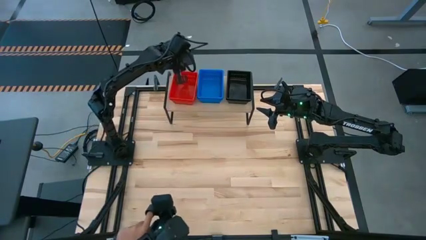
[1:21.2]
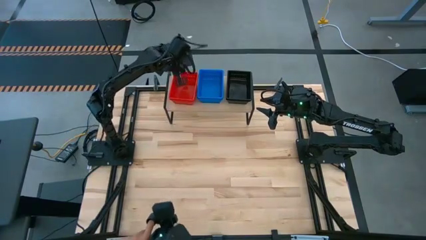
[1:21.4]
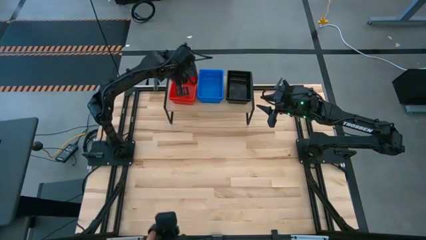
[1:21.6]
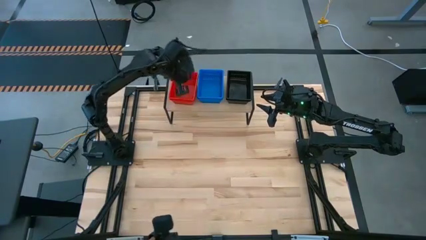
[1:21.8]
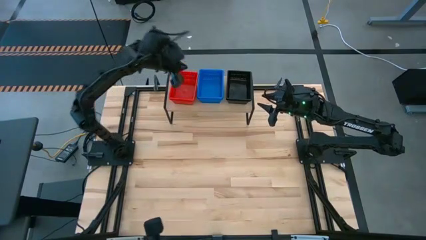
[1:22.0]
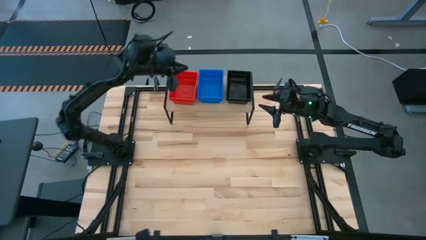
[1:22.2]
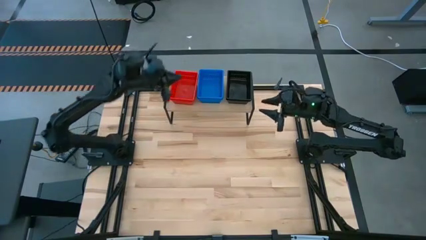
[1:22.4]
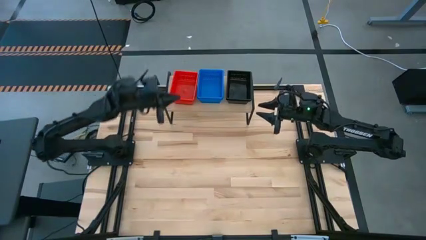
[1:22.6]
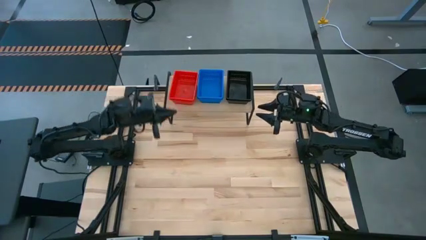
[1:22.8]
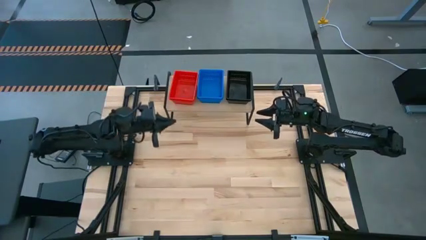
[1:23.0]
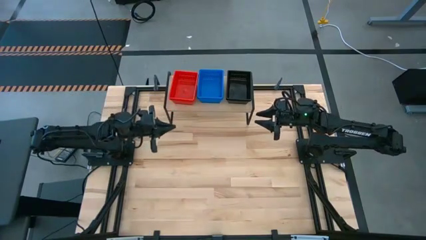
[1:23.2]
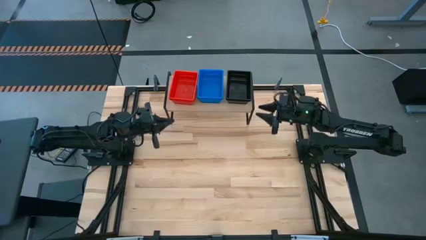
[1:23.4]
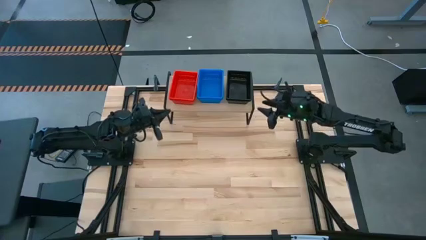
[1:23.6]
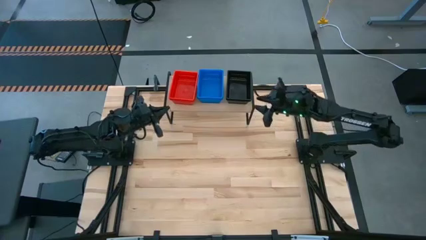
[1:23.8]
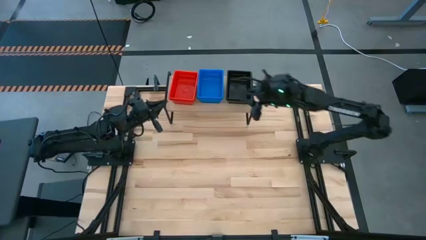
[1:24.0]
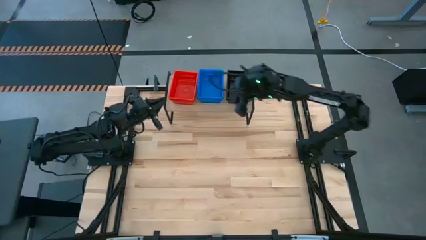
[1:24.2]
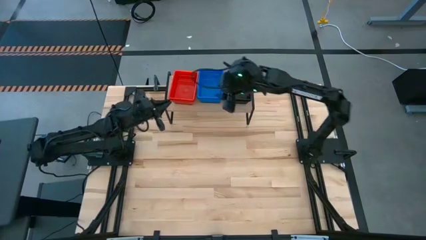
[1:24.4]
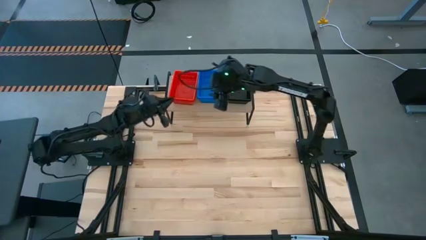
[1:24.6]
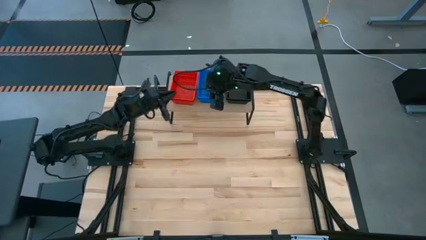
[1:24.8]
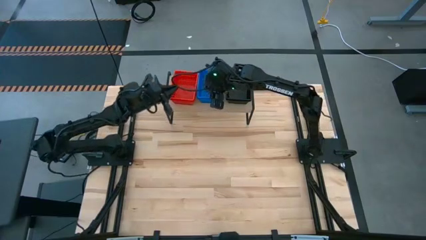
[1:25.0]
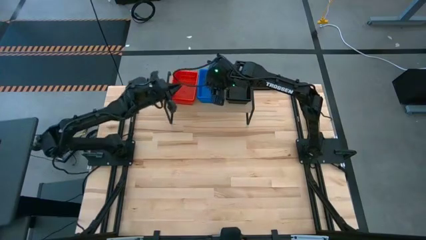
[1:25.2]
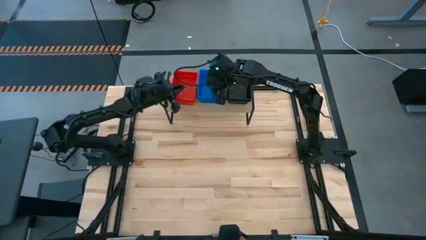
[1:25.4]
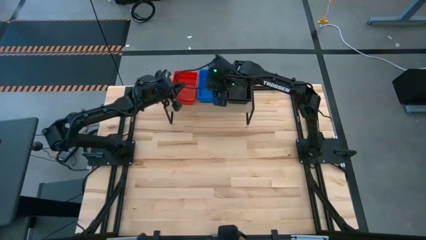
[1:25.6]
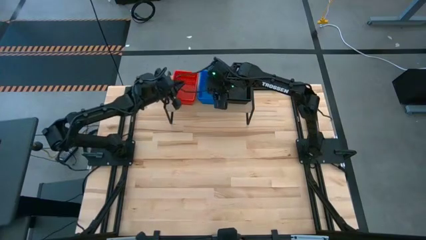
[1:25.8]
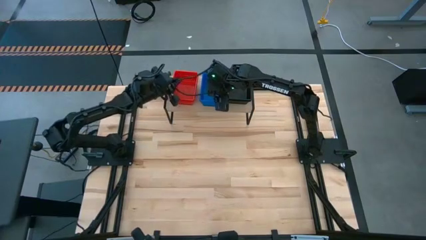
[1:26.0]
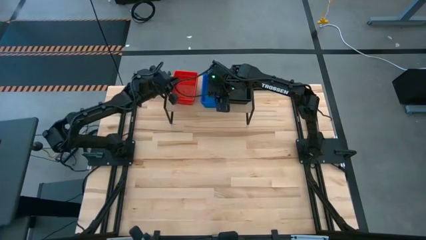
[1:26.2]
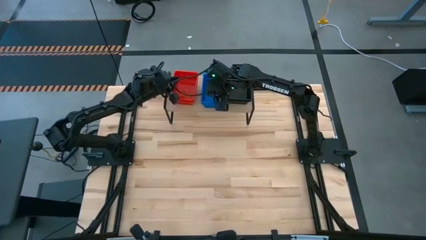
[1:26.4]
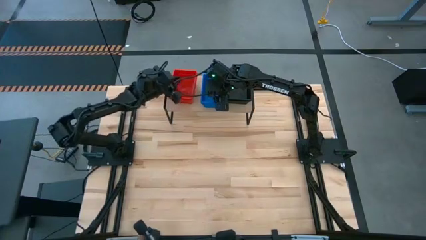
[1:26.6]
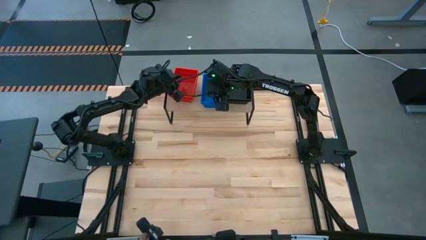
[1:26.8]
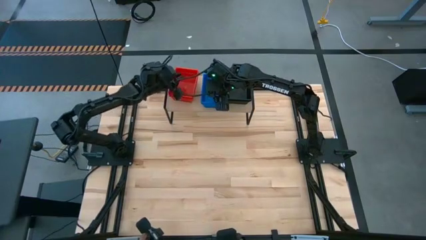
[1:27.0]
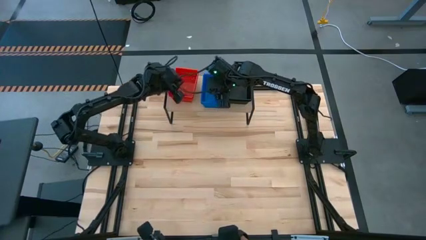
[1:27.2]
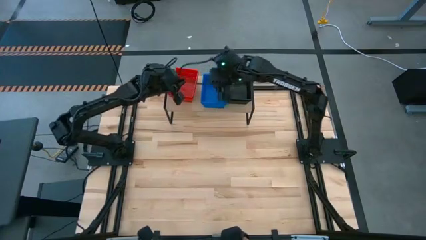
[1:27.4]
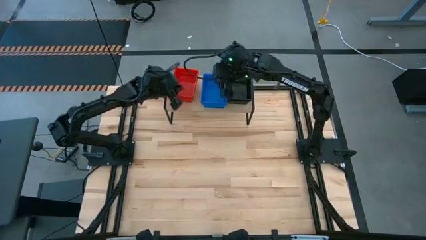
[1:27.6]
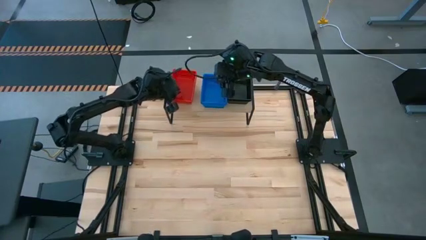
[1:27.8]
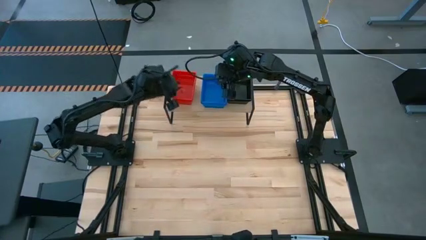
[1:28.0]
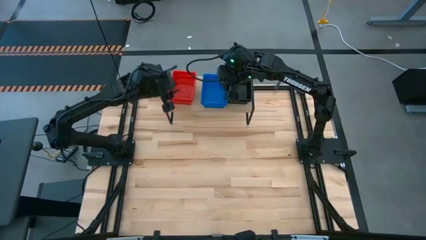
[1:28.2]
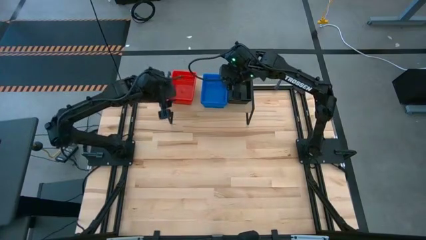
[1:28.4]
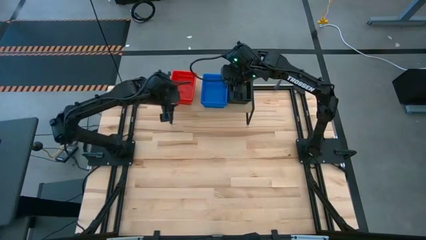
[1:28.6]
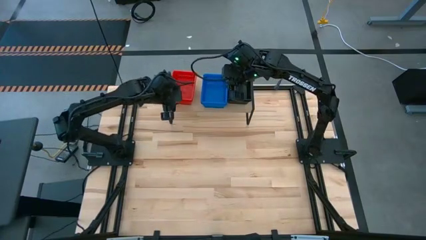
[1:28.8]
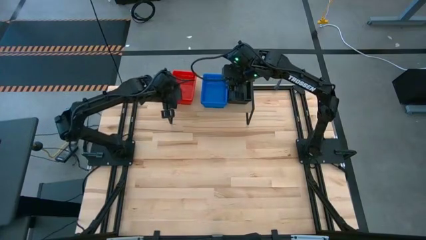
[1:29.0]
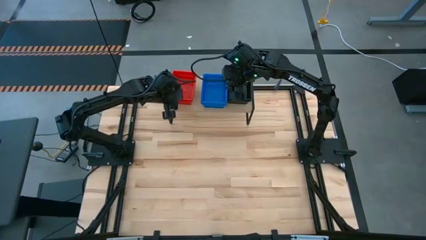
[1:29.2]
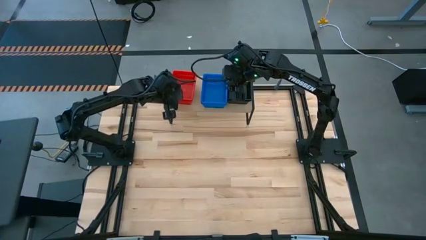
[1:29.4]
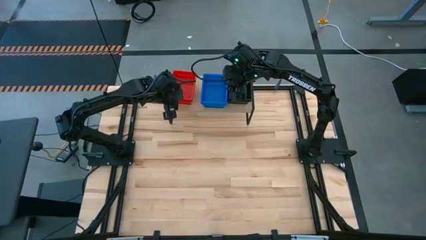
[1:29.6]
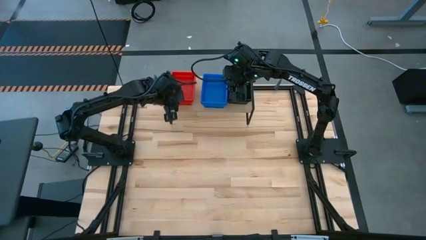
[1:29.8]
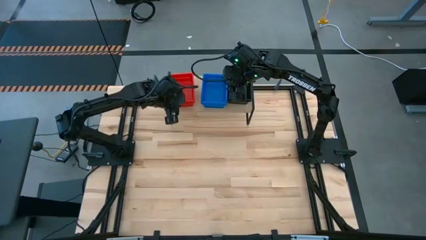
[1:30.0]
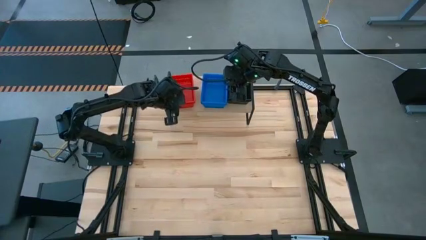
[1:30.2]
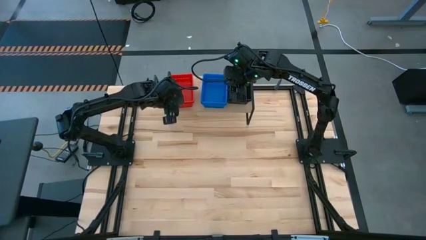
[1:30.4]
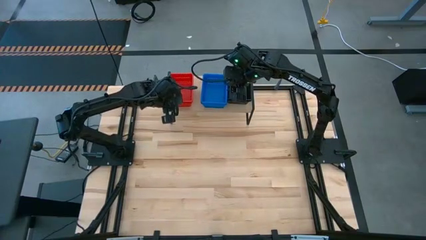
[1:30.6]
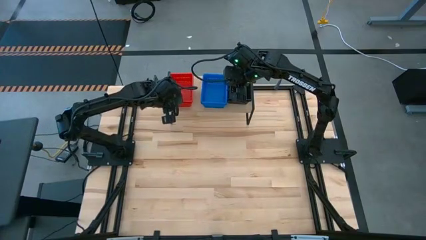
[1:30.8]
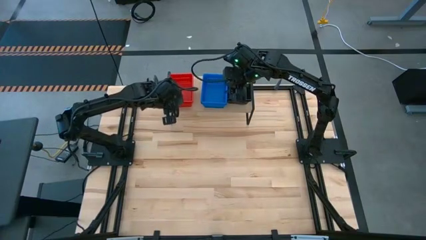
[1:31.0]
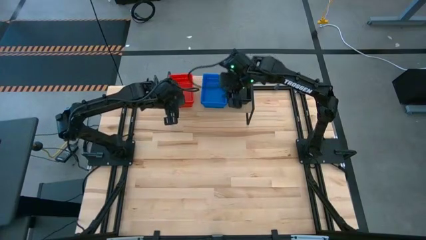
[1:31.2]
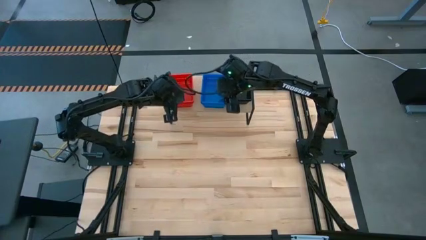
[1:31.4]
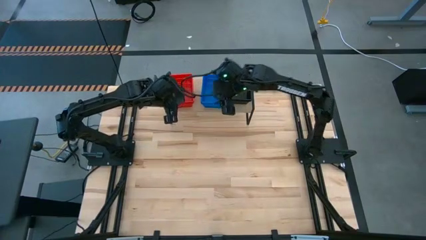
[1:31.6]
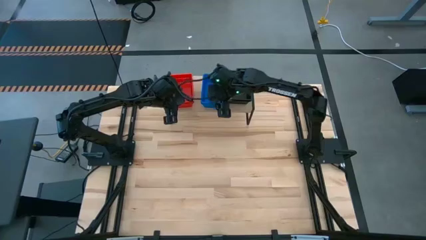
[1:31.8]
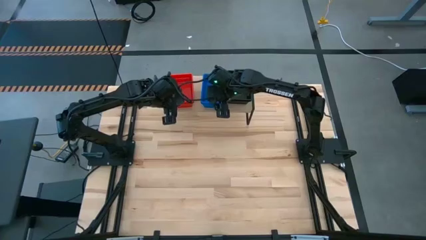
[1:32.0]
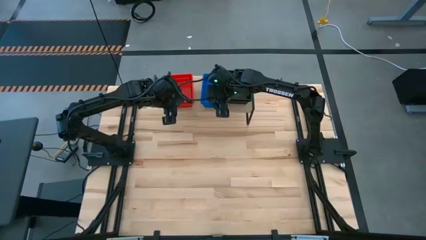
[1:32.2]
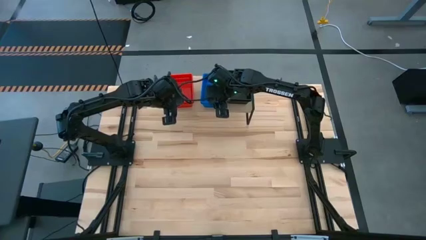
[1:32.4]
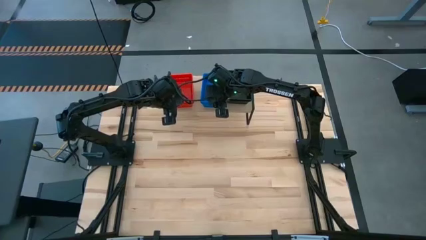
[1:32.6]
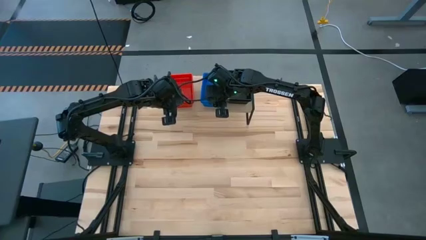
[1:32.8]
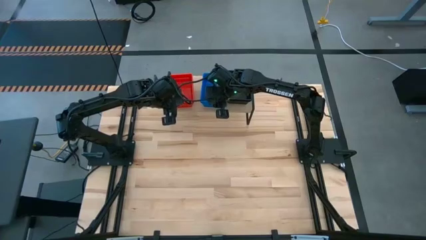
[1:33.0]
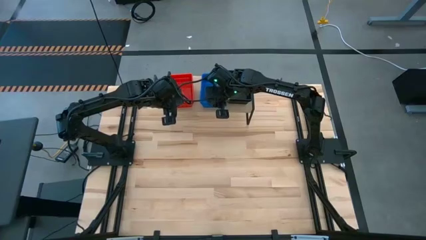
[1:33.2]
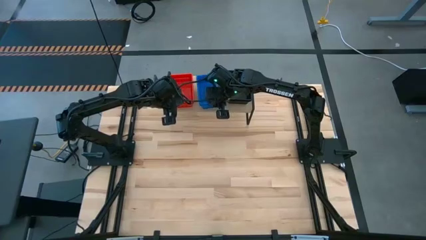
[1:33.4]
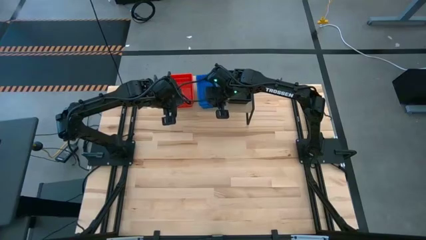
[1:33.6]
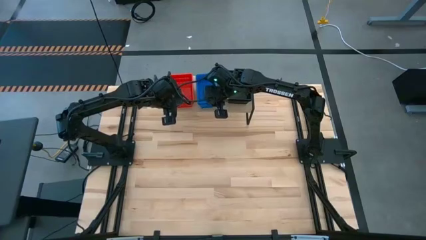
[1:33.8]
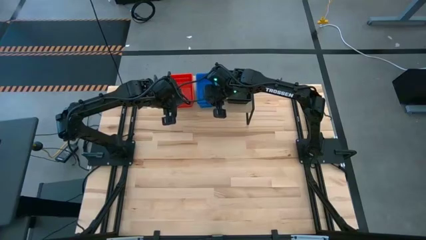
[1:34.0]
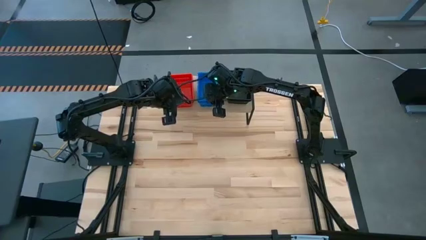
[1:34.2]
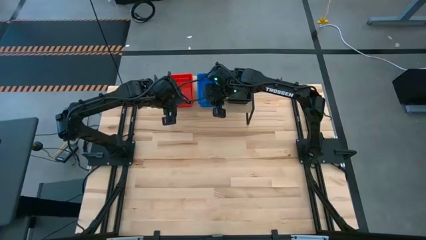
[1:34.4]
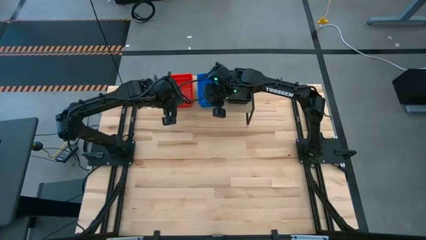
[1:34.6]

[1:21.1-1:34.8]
Task: Stack baskets on shelf by color
Adjust the bins on the shelf

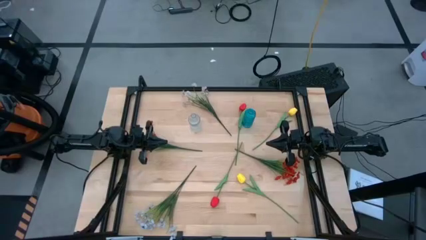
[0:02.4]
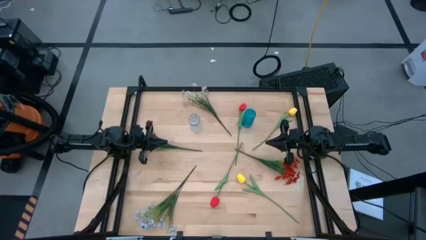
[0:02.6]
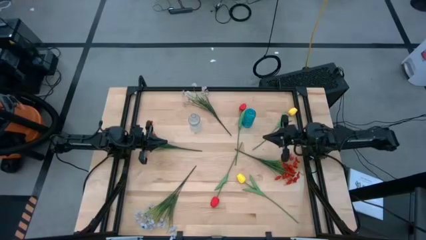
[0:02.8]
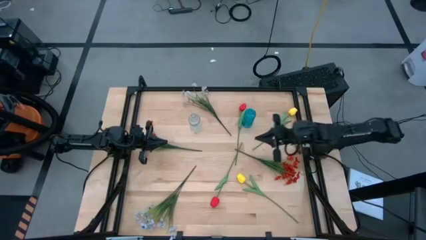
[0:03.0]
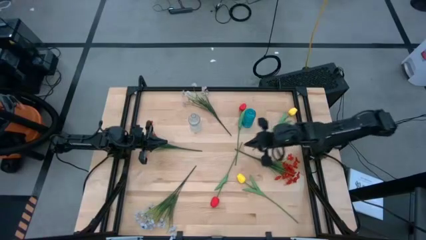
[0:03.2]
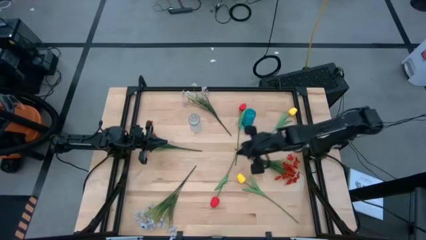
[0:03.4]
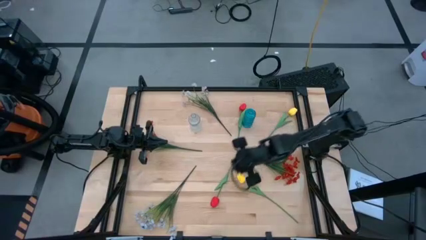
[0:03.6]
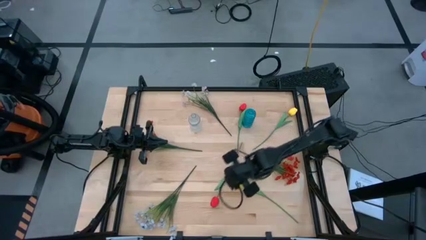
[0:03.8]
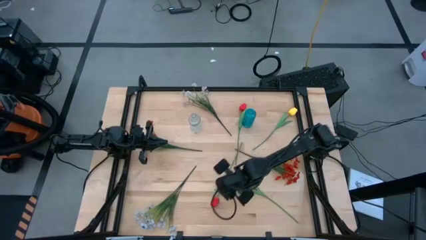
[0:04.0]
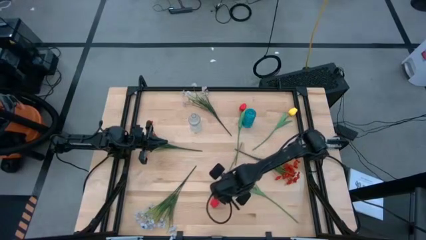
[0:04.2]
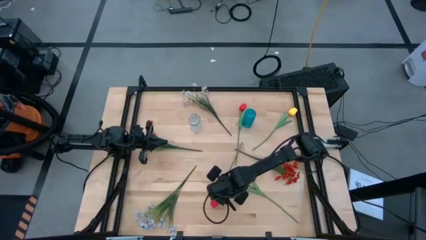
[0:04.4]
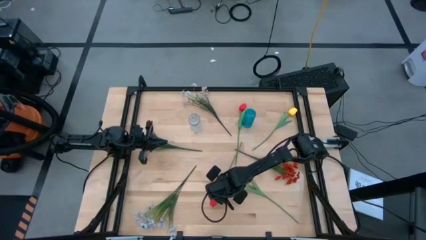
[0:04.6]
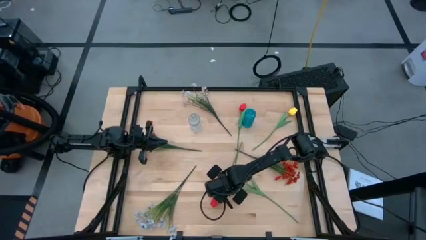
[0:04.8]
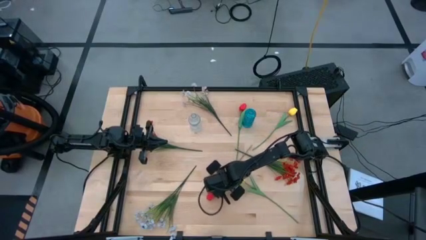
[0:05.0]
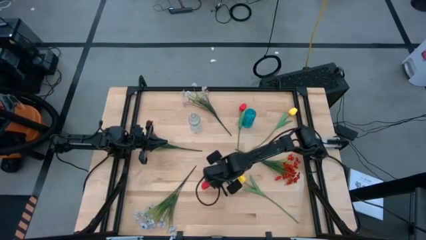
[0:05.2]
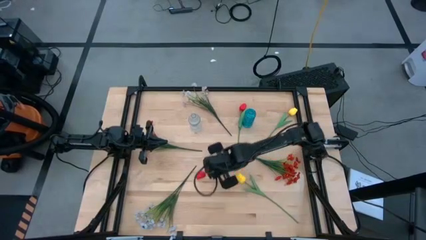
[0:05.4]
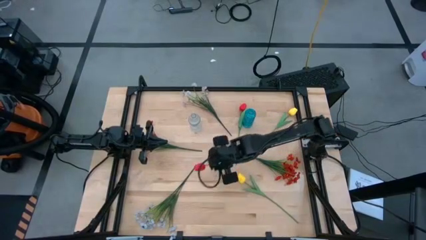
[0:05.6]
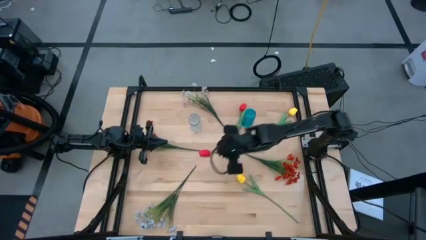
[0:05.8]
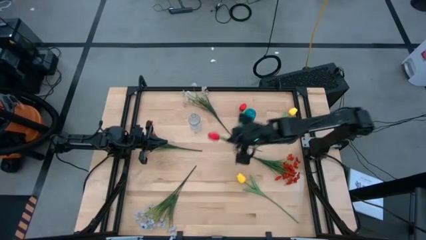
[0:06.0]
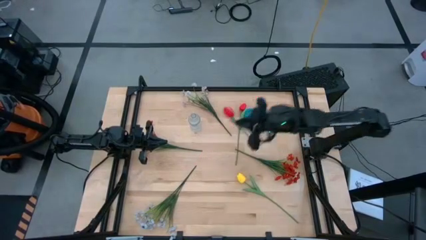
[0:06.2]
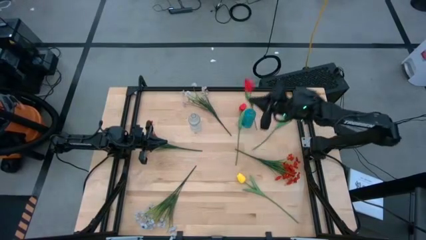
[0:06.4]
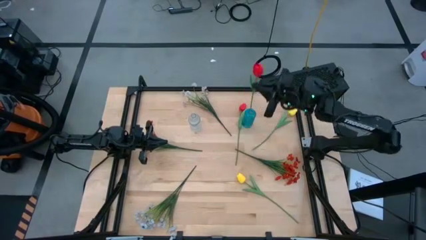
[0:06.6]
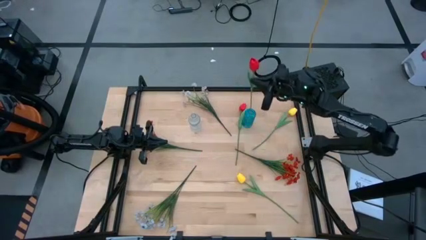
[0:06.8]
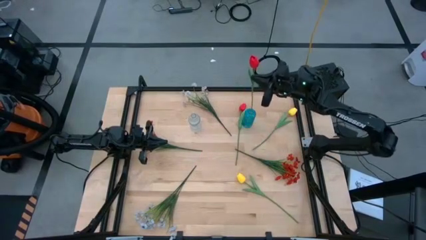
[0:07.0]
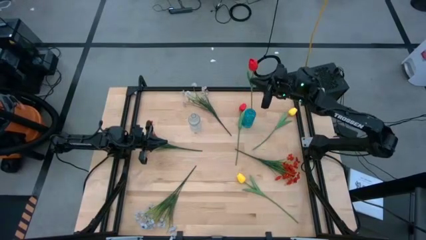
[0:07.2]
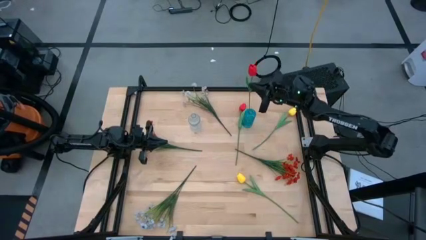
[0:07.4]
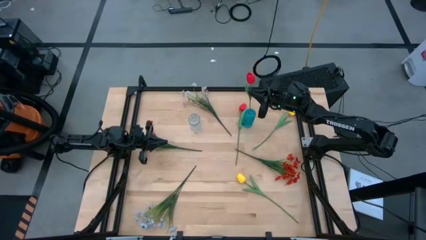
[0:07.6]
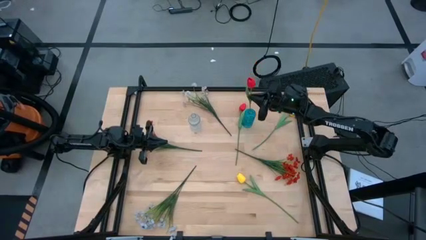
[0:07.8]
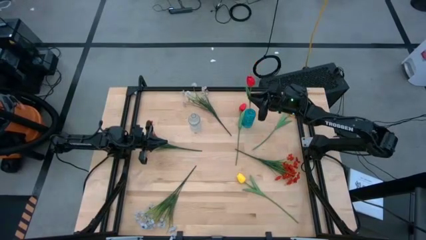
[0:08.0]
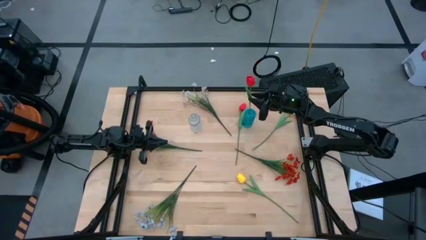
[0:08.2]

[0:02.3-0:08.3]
Task: Sort flowers into vase by color
Put the bottom red flowers into the blue crystal vase
